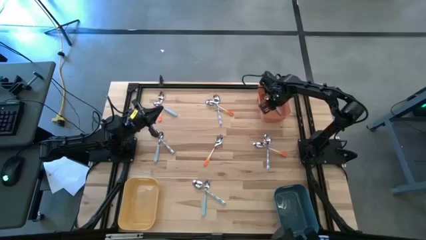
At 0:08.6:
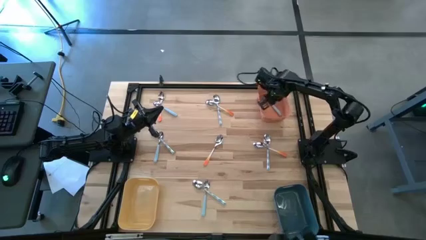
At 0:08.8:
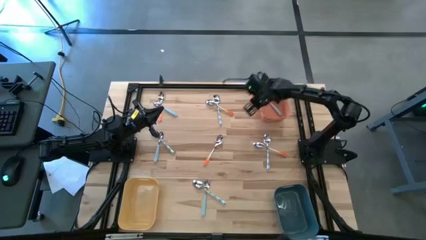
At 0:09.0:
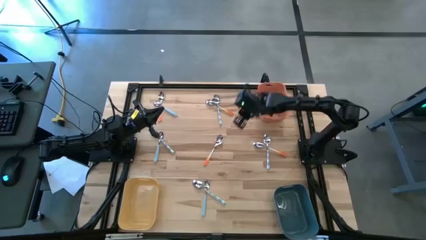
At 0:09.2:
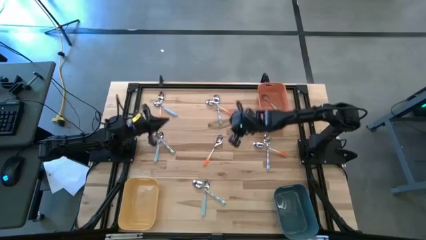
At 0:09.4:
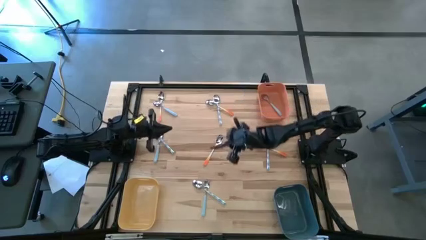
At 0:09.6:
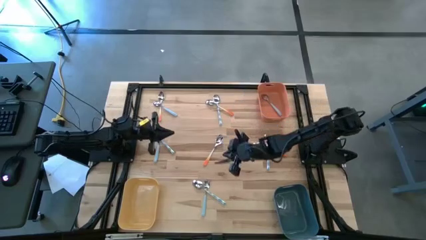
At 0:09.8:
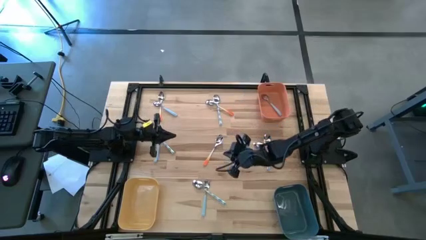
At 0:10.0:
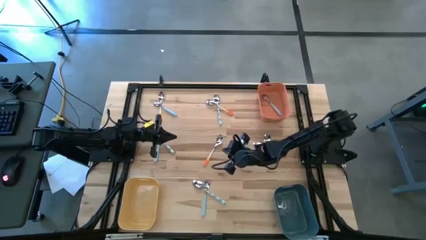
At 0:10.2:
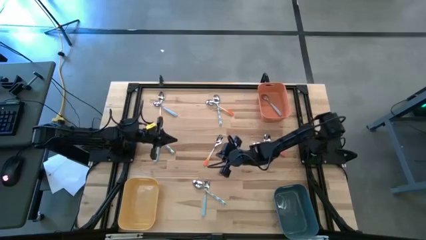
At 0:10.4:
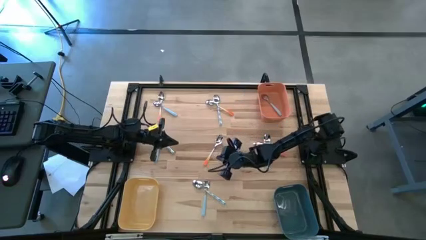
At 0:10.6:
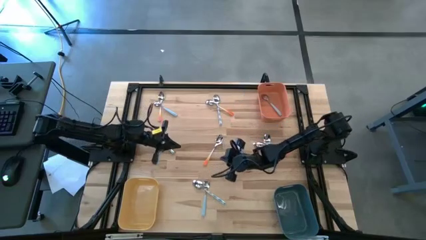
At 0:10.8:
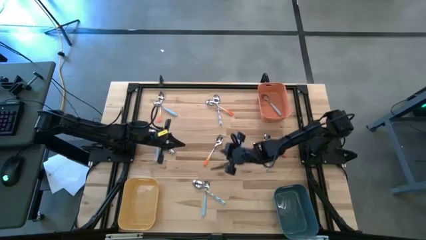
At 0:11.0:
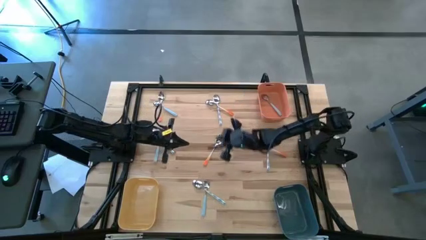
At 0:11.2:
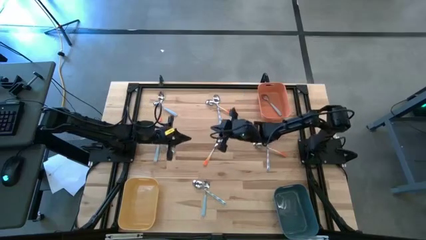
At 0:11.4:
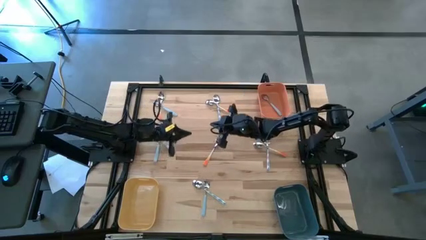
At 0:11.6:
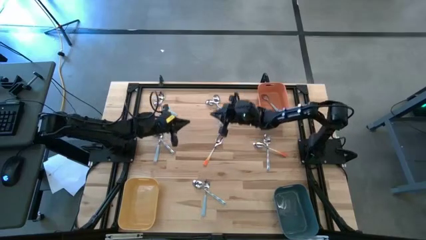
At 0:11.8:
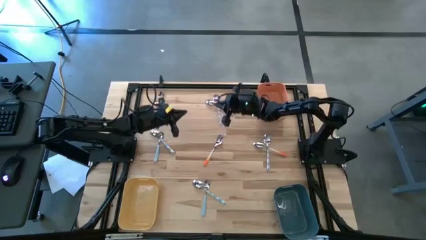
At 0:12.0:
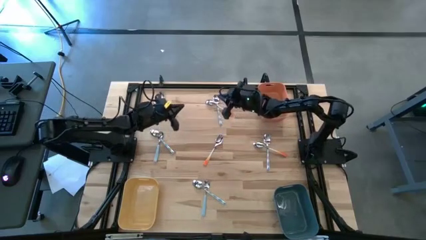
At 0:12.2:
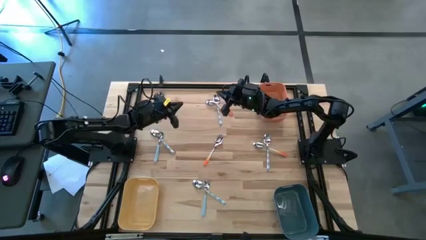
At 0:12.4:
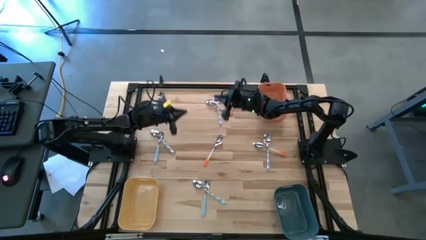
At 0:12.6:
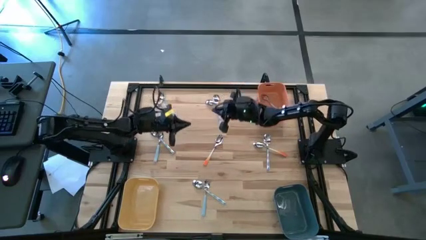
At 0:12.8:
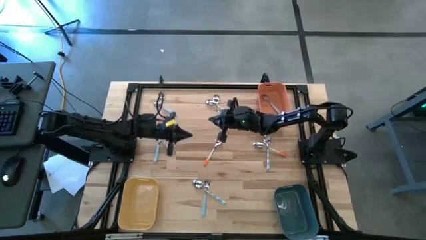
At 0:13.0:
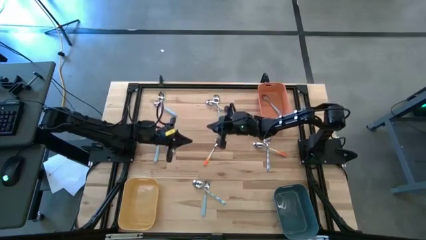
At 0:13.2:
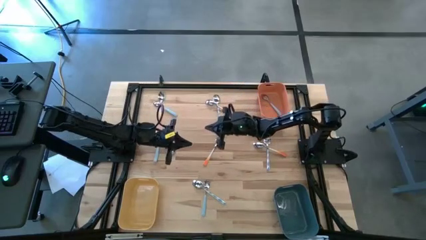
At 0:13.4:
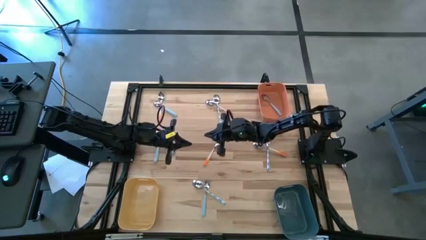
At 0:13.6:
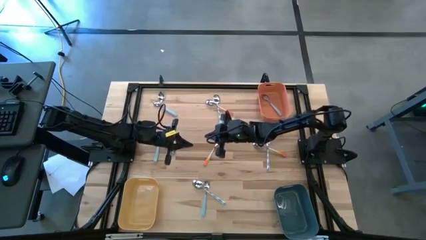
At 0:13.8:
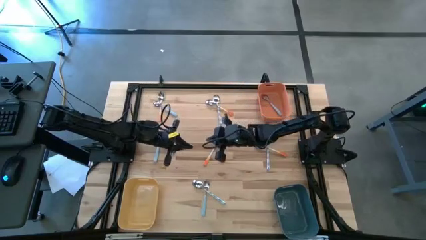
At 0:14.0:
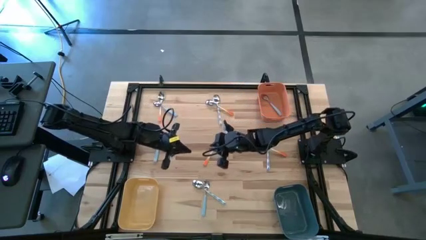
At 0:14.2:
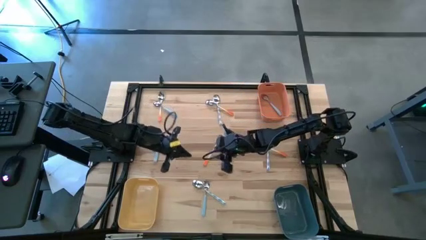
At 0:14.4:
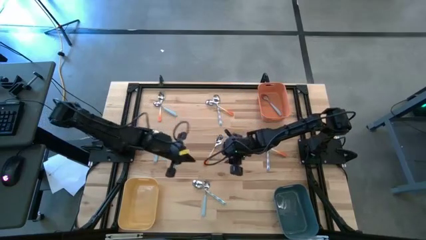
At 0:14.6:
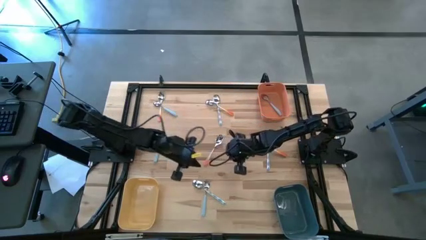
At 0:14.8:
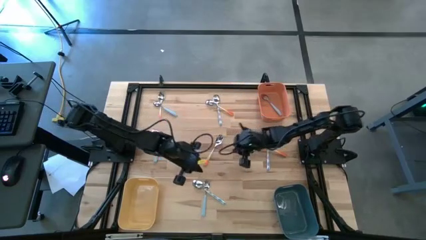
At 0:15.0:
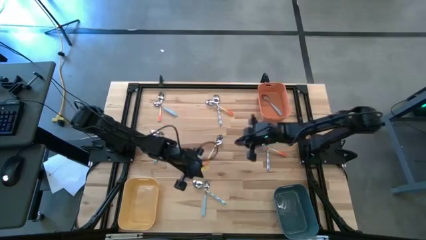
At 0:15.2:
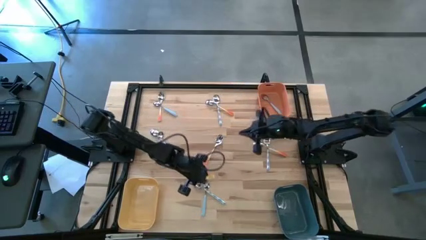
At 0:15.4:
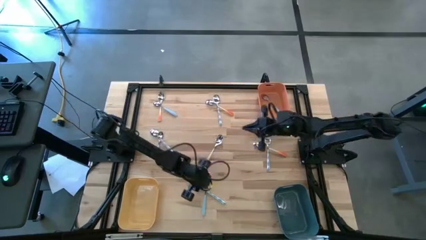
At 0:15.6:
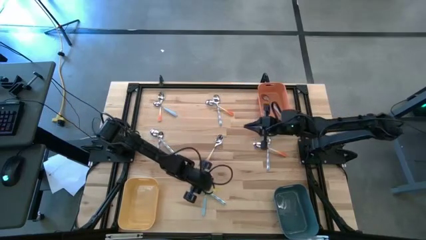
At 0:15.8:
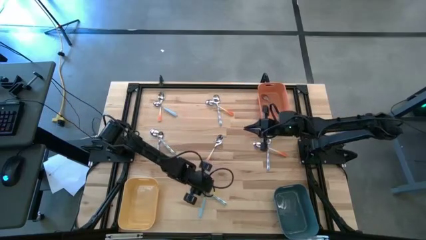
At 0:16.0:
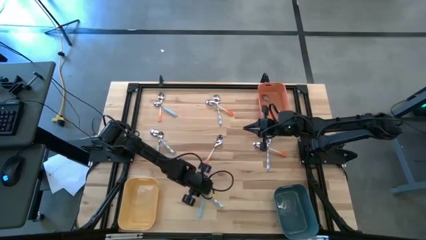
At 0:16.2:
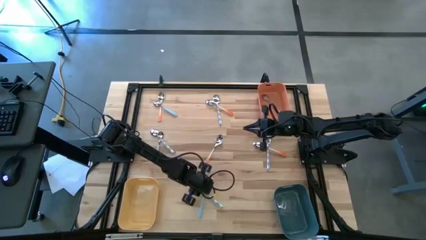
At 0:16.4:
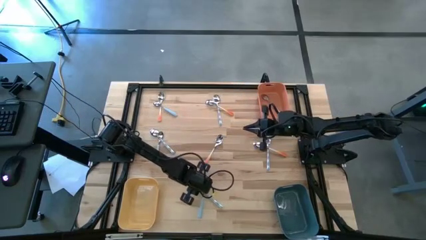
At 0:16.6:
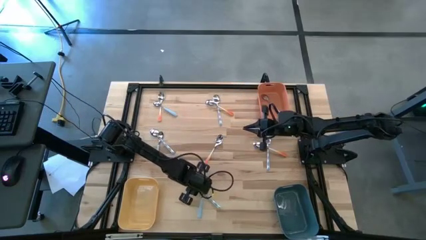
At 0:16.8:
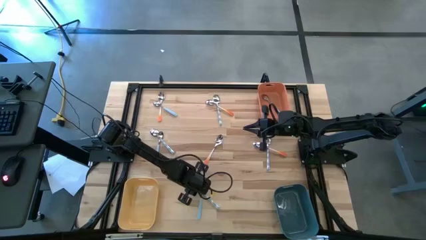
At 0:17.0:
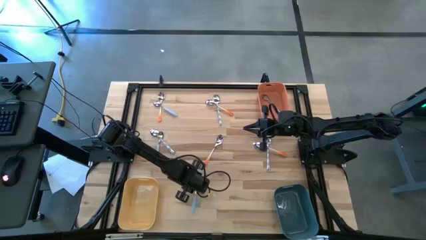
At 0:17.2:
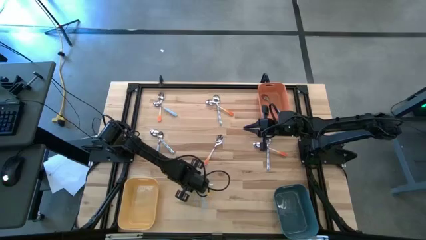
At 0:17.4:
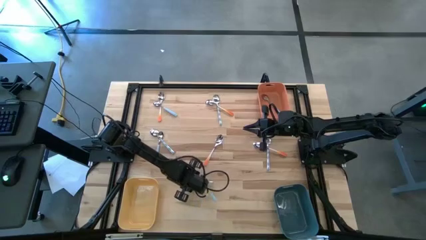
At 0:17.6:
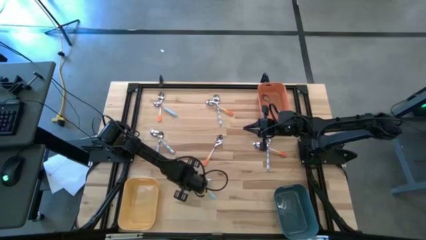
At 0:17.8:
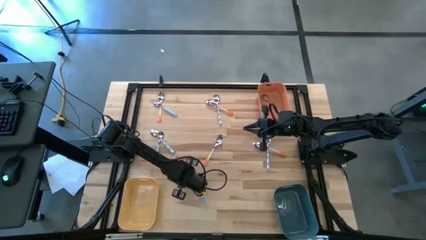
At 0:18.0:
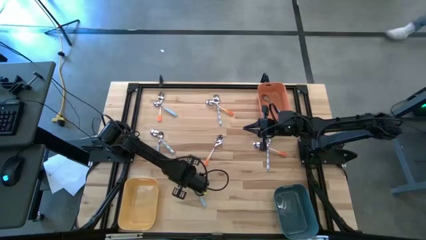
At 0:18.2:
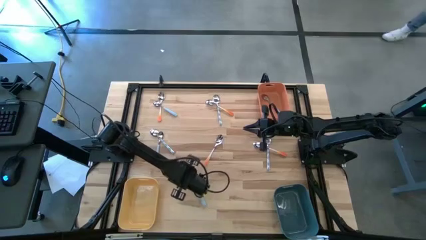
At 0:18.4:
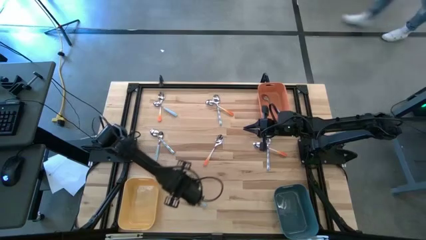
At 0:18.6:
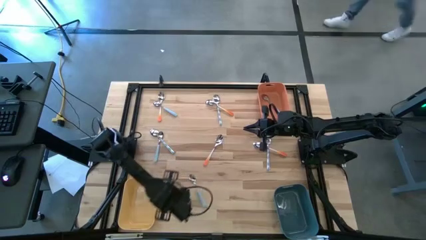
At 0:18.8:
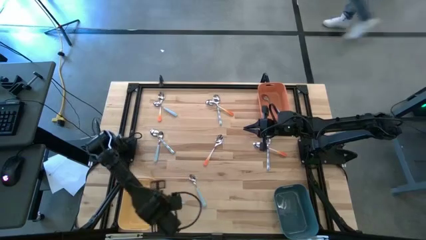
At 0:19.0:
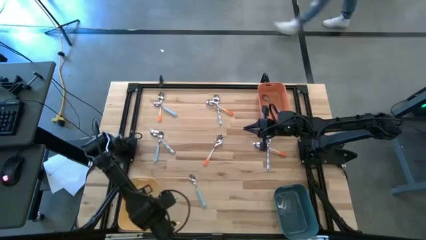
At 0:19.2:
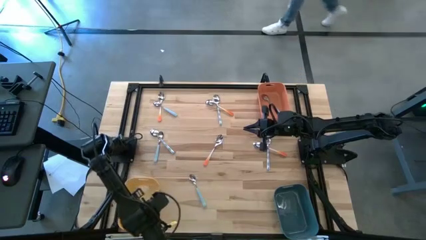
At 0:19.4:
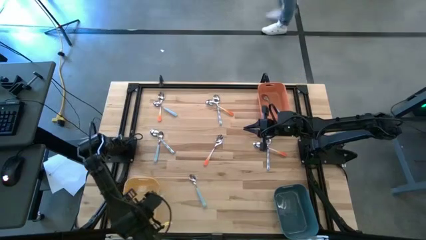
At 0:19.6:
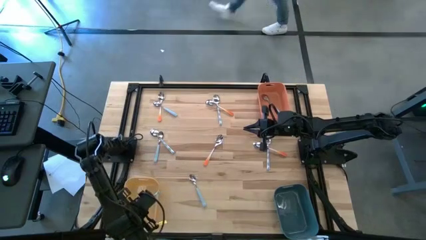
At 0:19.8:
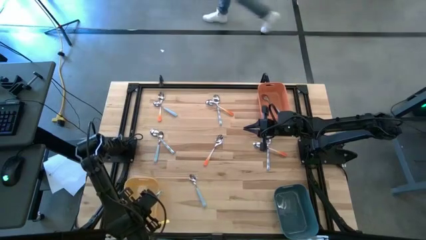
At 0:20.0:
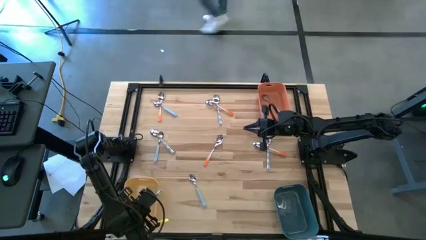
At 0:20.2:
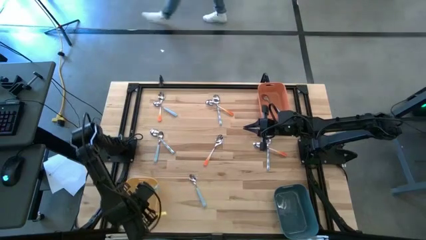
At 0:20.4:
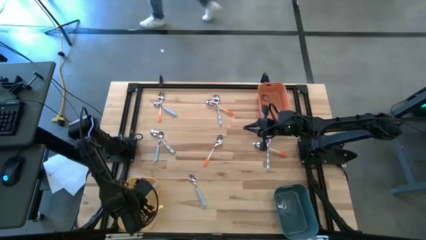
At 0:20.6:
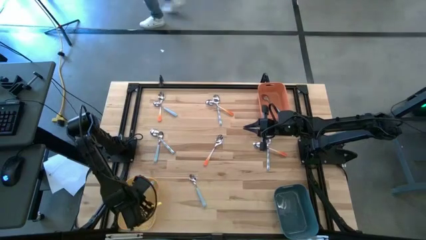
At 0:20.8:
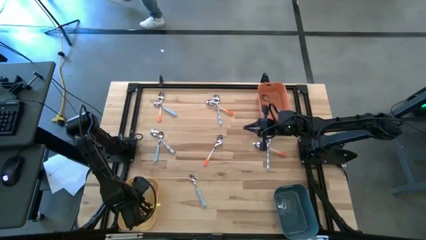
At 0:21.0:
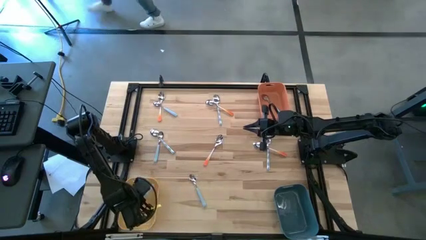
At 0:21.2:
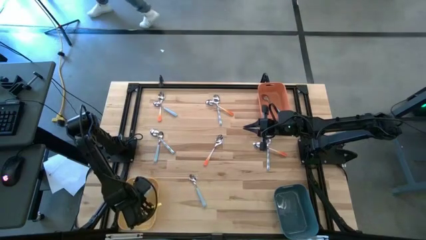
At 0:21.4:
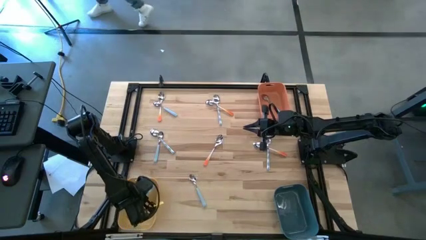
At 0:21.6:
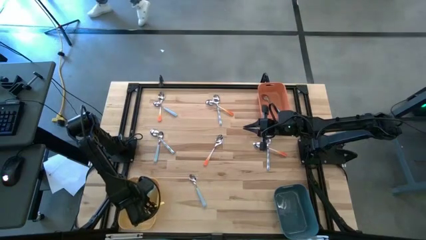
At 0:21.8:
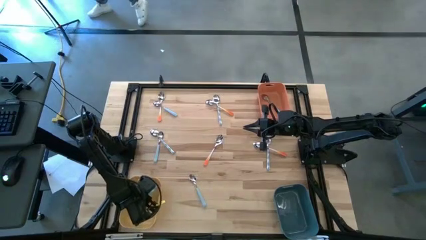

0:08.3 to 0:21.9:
Task: Sort silverware by color (type)
Put the bottom light blue patterned spoon into the yellow bin
